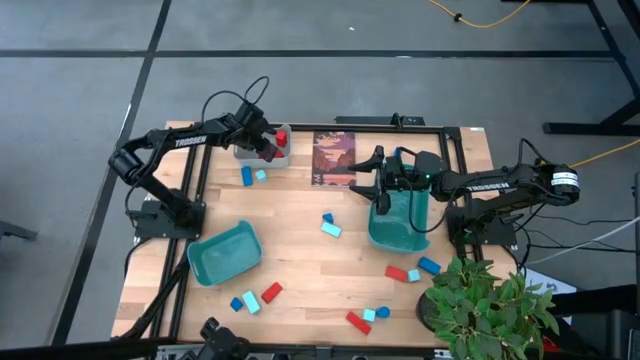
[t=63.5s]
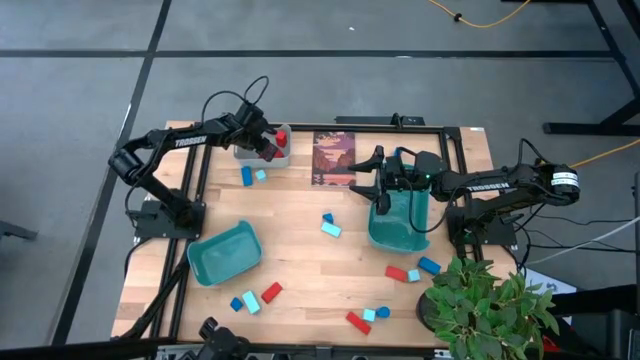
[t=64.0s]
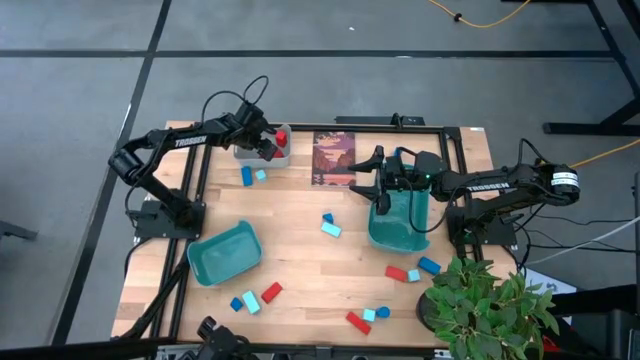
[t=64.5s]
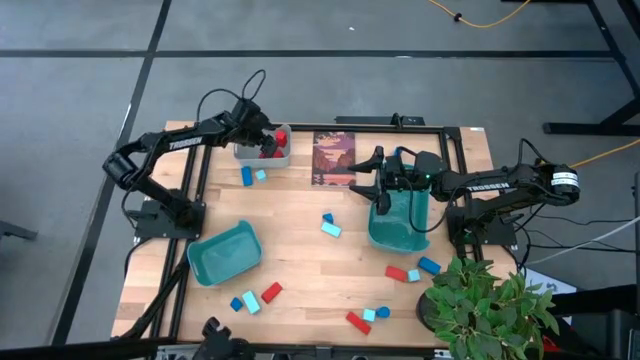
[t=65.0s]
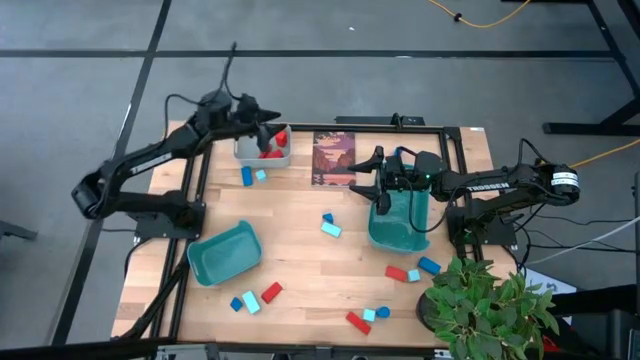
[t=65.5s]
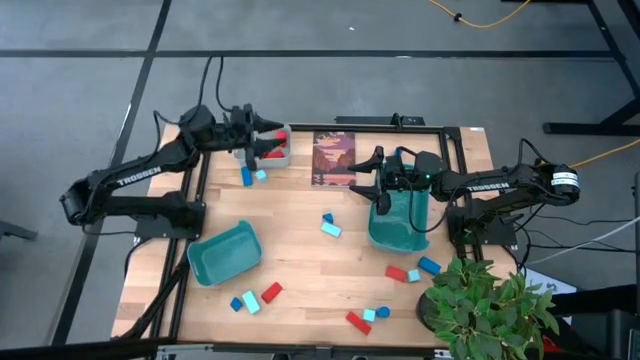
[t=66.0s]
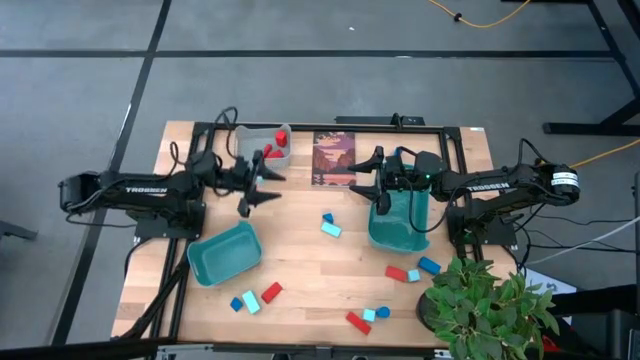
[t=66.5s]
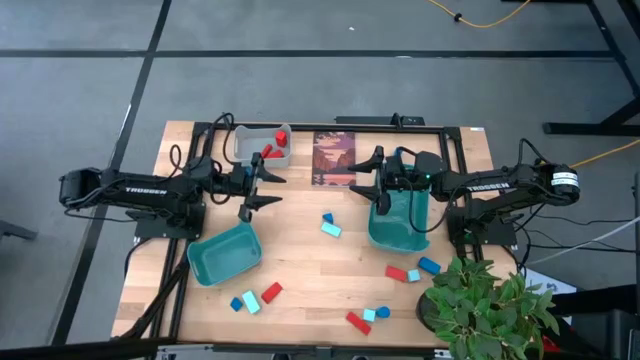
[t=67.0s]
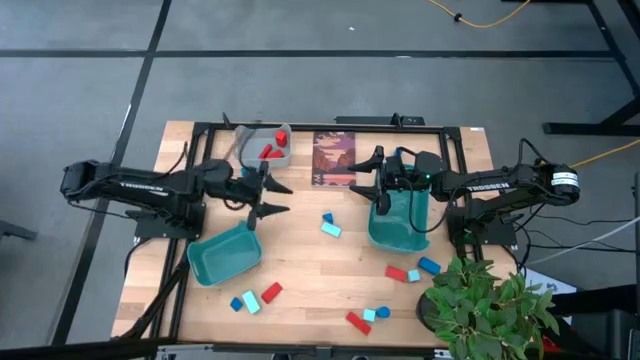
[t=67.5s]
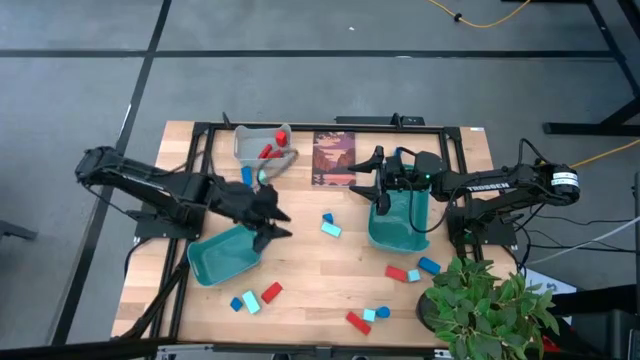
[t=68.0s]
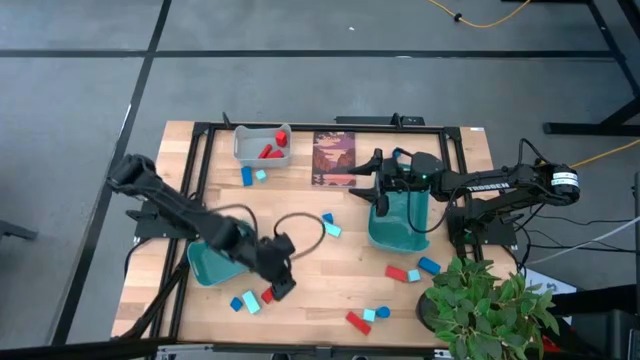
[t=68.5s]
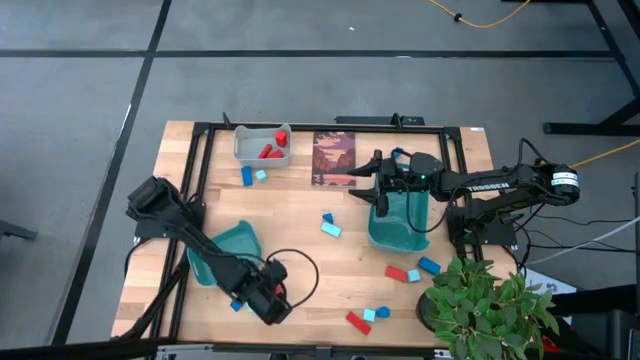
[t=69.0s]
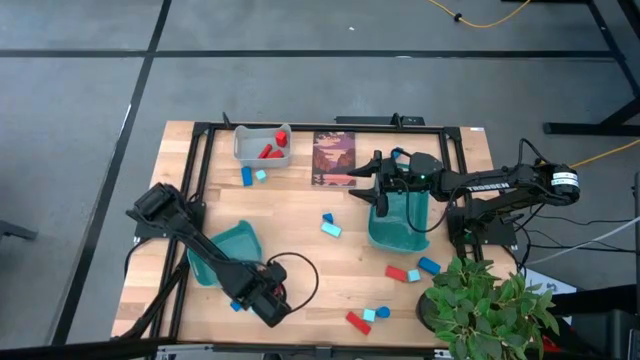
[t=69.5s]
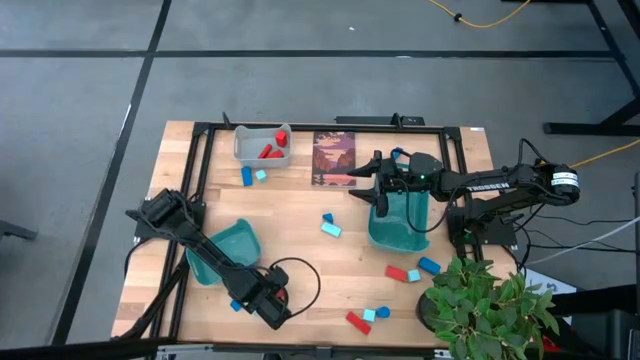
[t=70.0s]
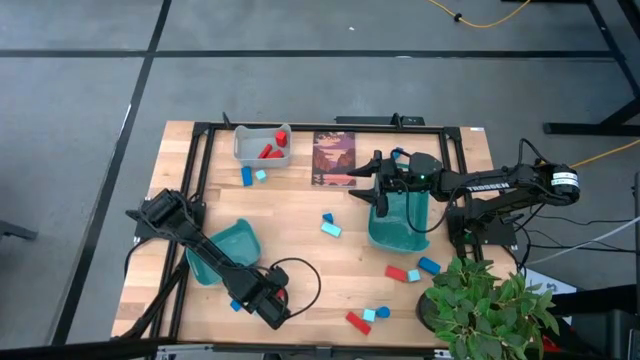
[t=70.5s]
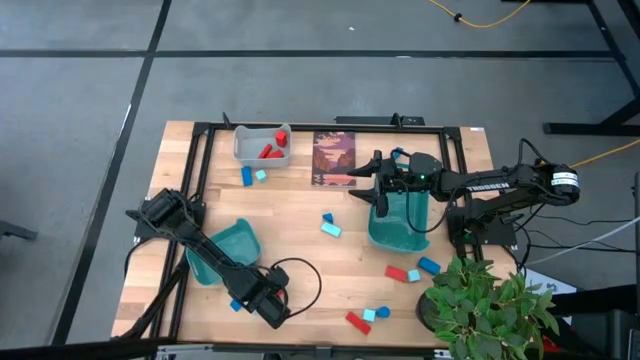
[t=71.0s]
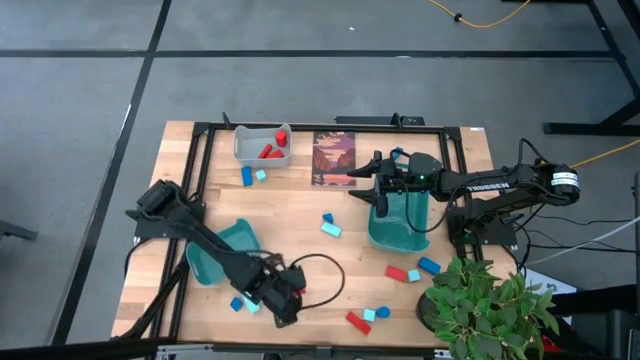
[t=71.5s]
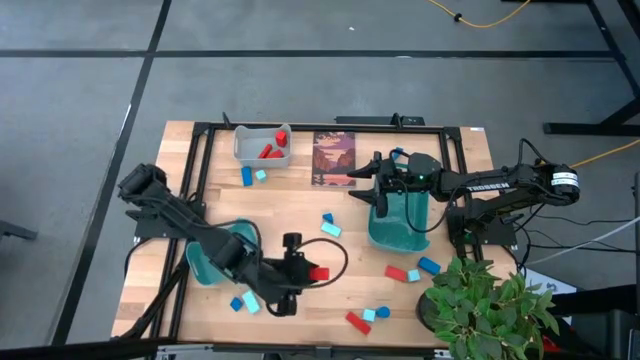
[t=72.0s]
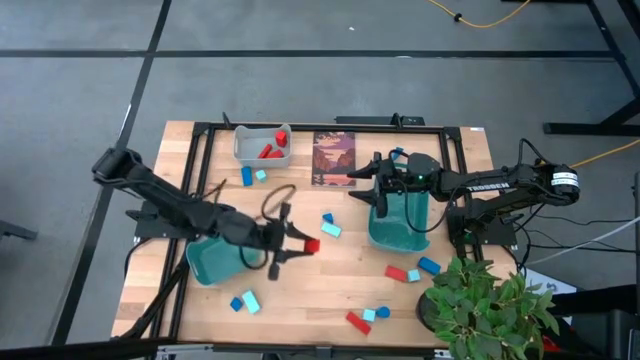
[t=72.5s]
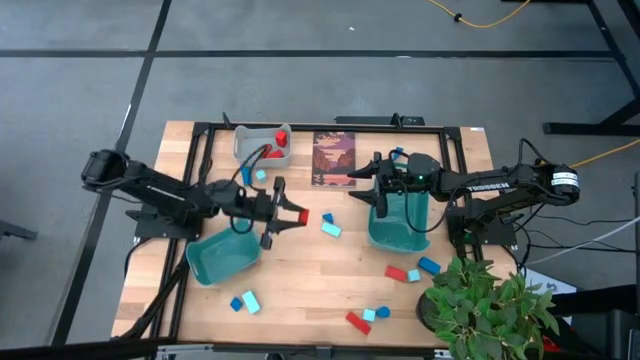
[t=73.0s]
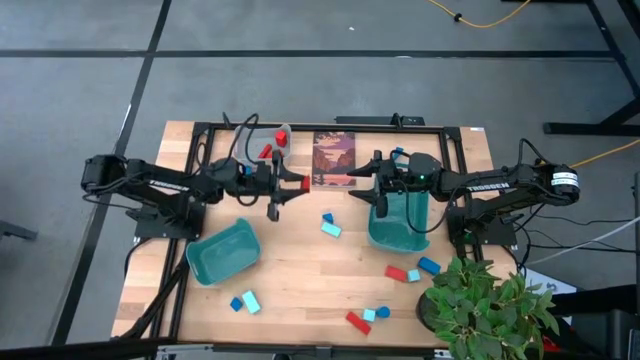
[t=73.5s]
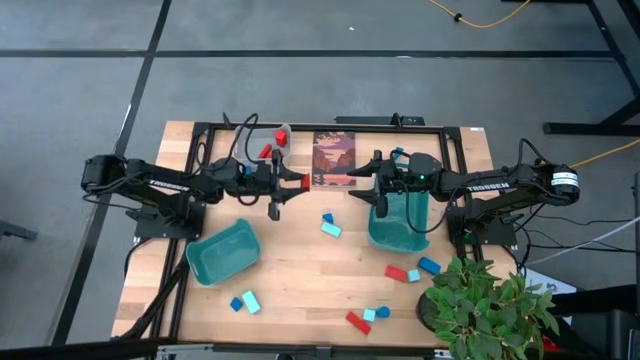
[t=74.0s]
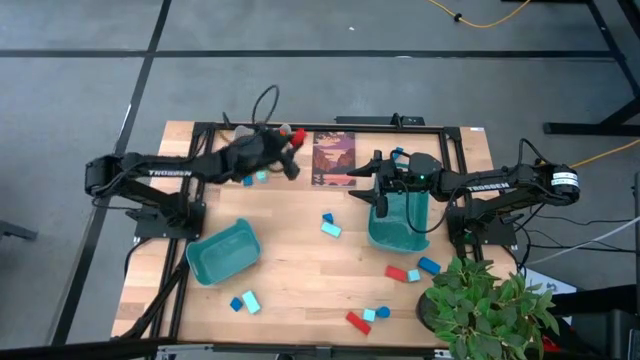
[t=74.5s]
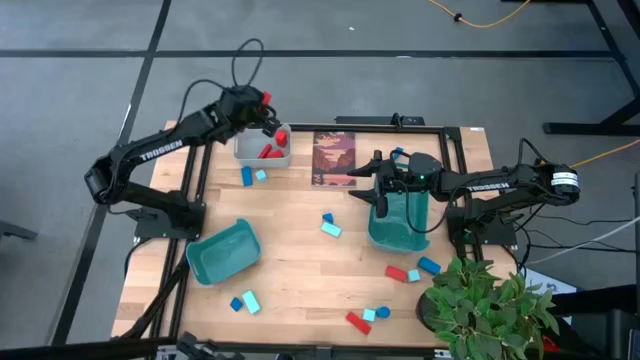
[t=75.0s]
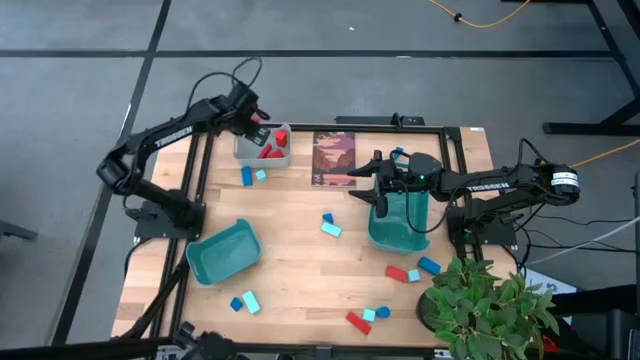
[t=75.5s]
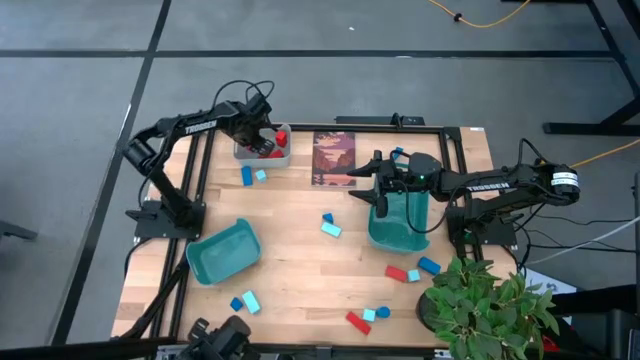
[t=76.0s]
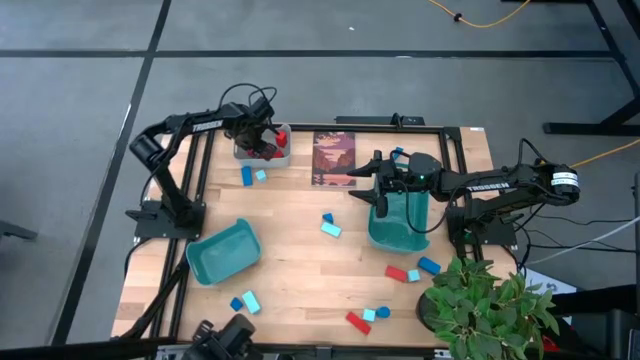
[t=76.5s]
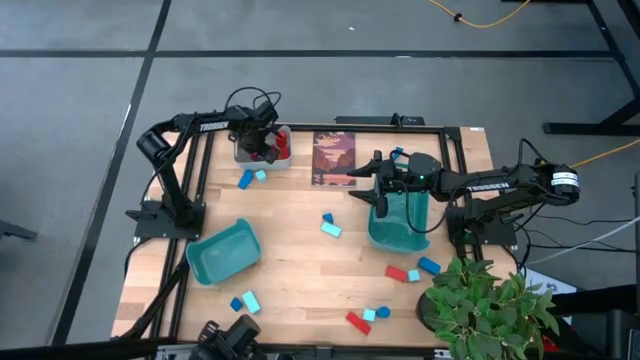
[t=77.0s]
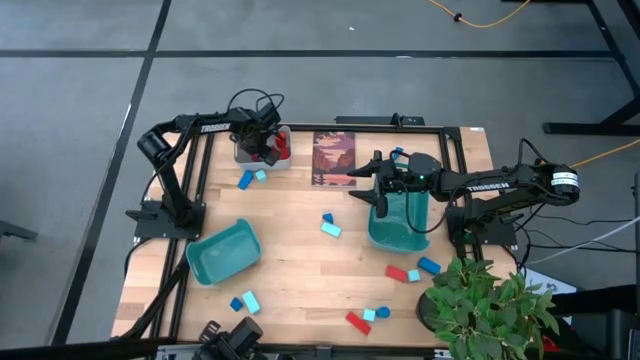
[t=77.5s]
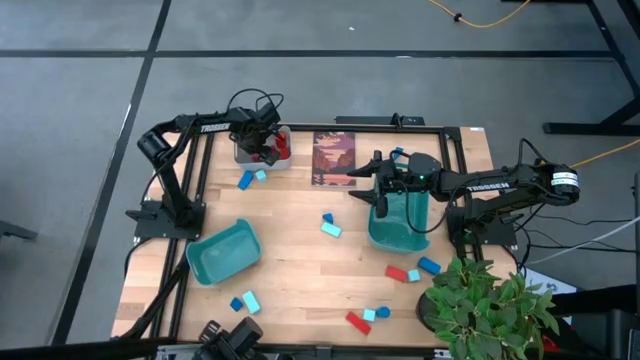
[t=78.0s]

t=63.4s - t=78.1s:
Task: Sort & place blocks by color
Put the red block into the gray bin

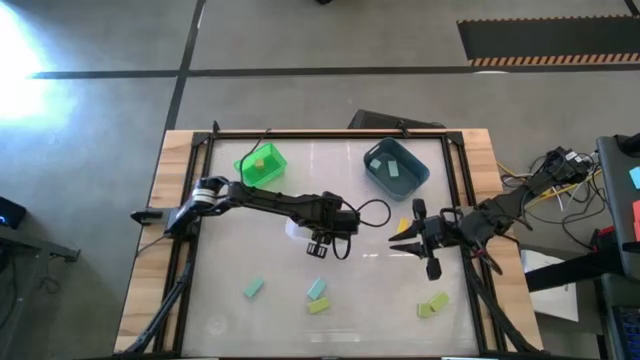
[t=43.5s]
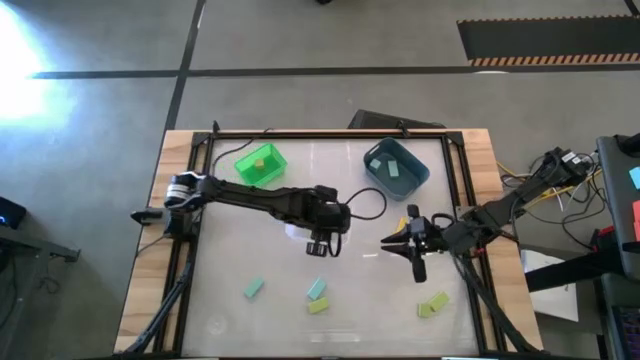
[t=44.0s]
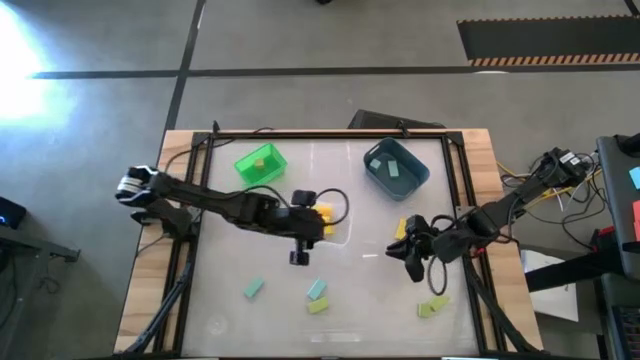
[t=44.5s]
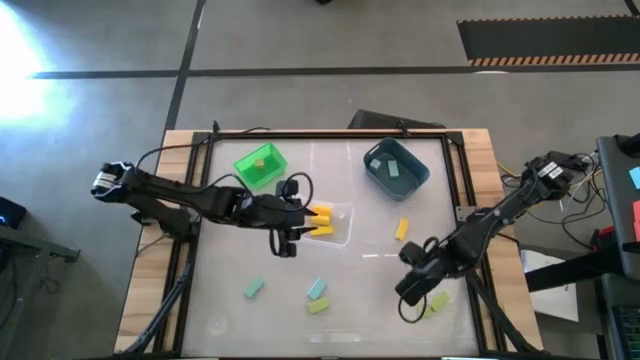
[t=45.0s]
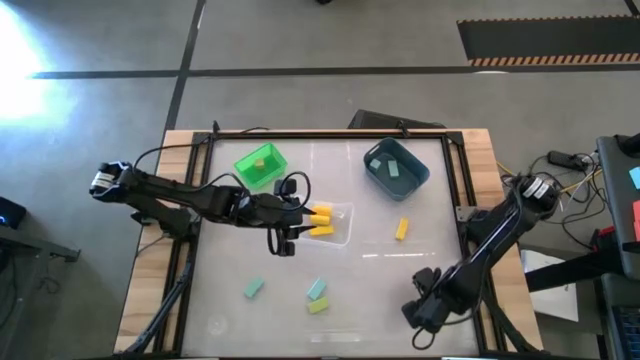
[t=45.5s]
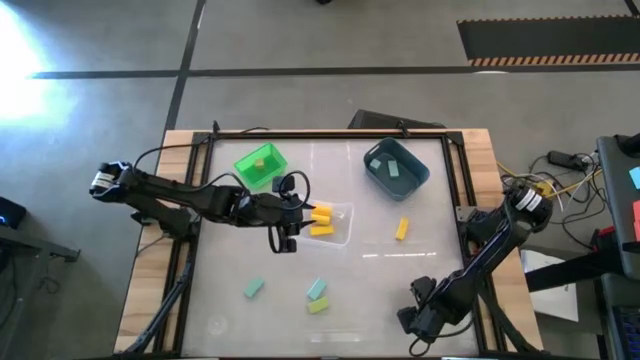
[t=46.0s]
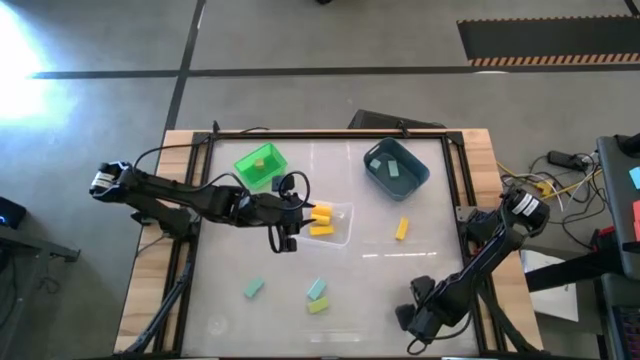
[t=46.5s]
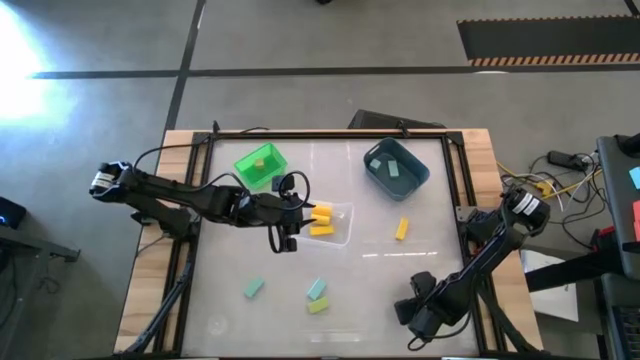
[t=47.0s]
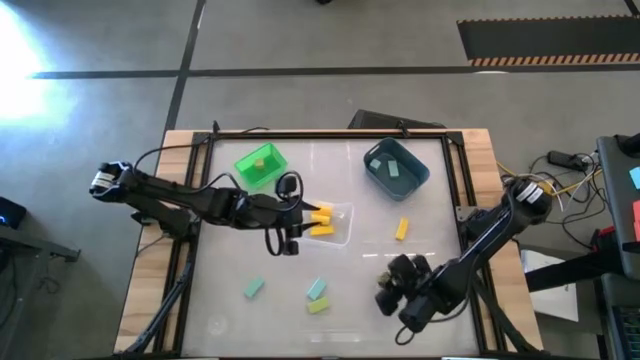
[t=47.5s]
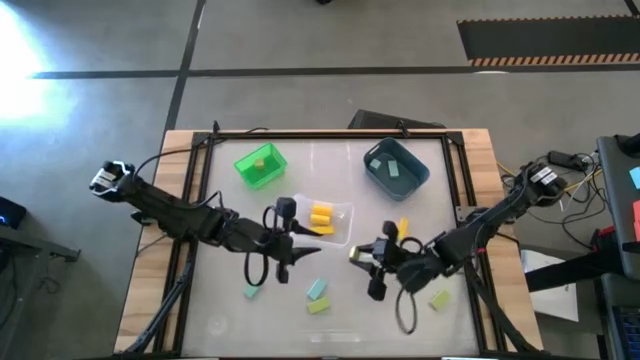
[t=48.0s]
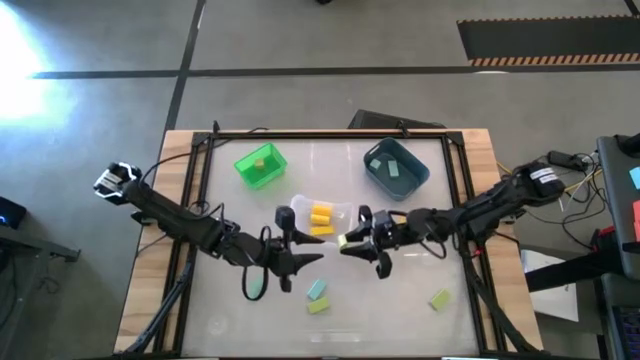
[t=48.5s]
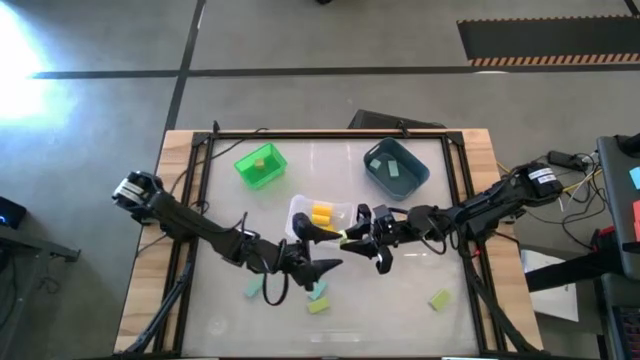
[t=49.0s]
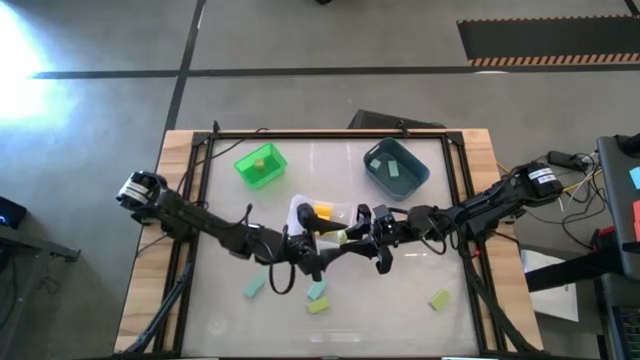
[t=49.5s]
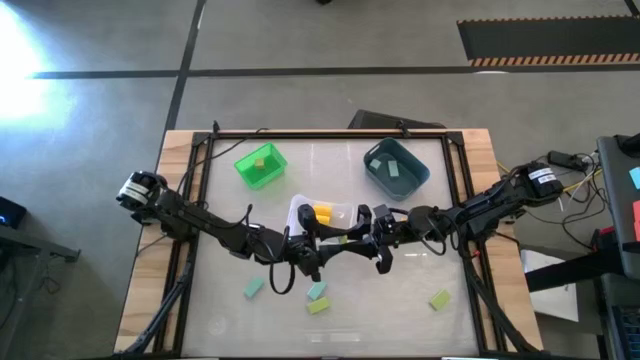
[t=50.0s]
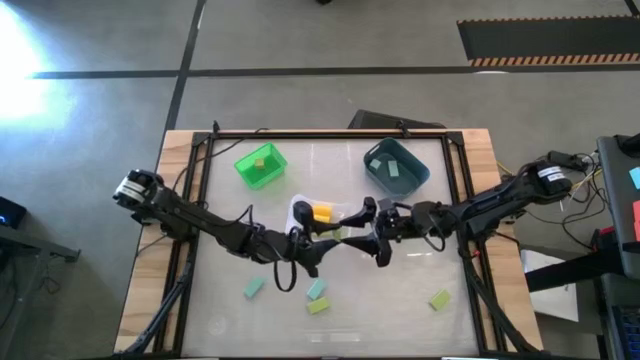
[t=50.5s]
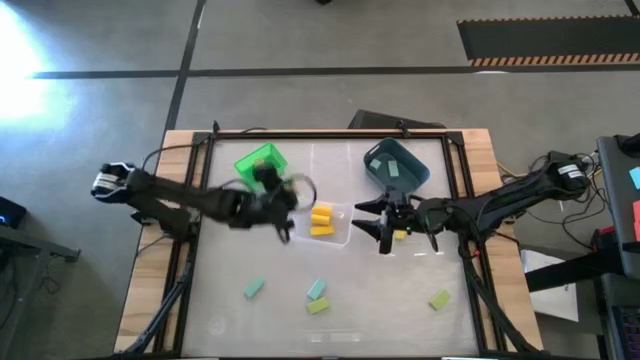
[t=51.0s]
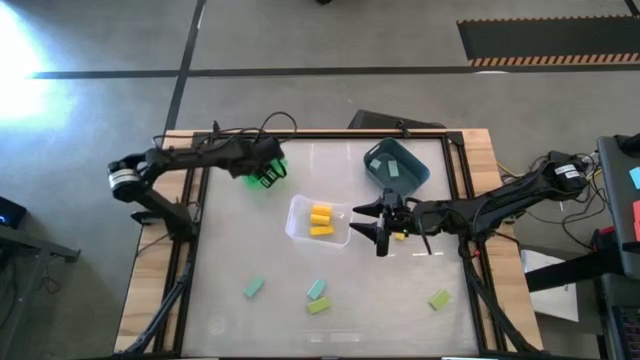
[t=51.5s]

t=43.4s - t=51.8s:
Task: Sort & place blocks by color
Put the green block into the green bin
